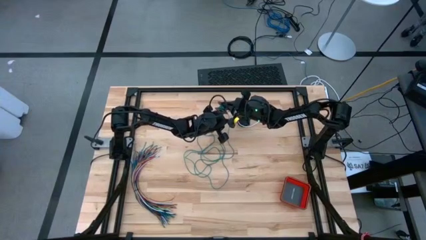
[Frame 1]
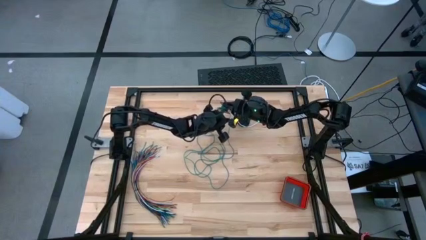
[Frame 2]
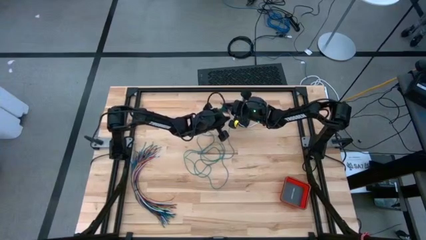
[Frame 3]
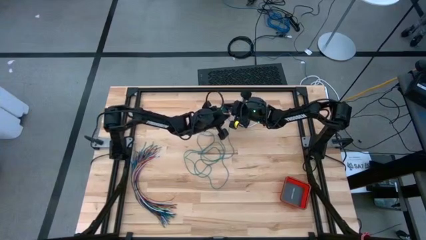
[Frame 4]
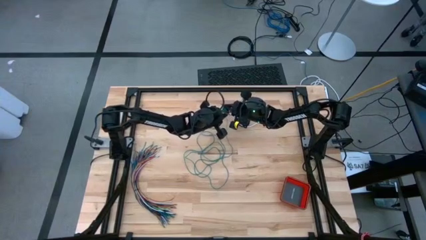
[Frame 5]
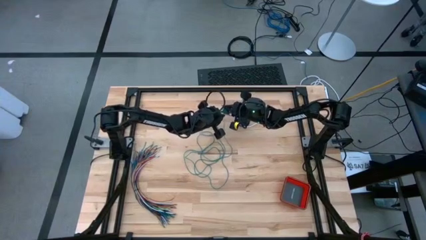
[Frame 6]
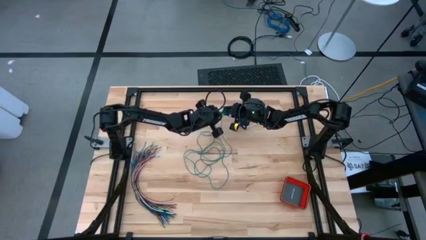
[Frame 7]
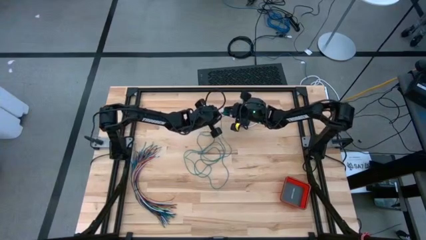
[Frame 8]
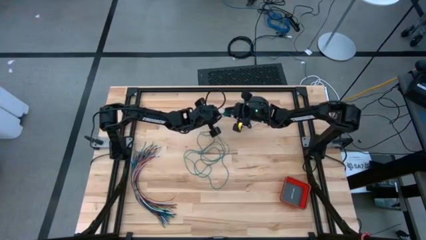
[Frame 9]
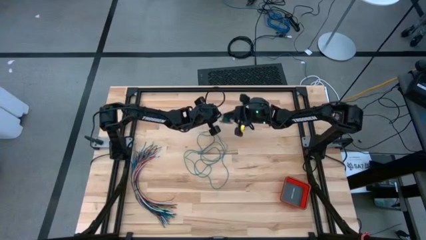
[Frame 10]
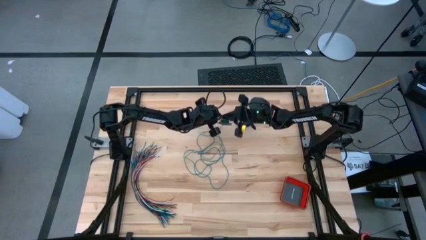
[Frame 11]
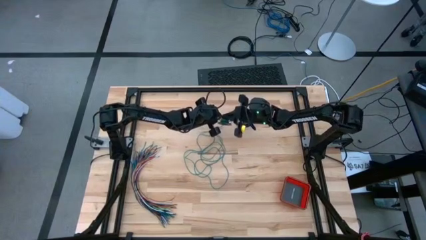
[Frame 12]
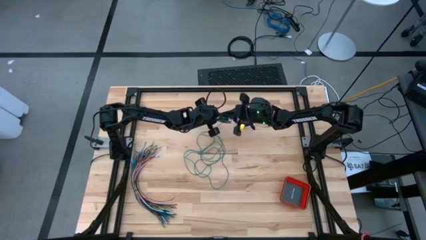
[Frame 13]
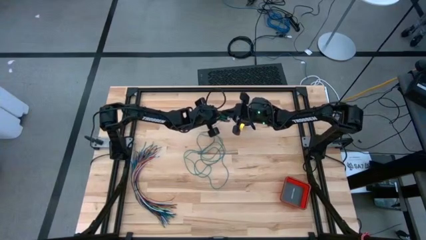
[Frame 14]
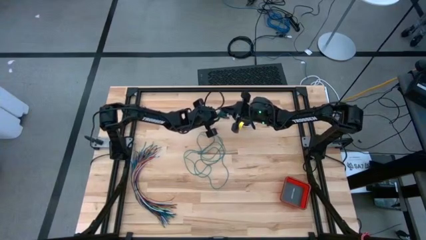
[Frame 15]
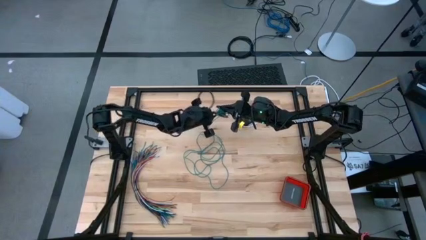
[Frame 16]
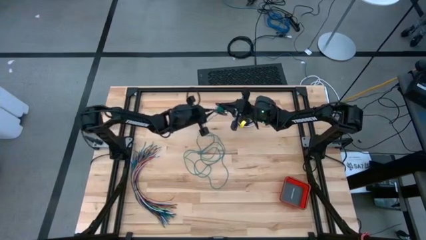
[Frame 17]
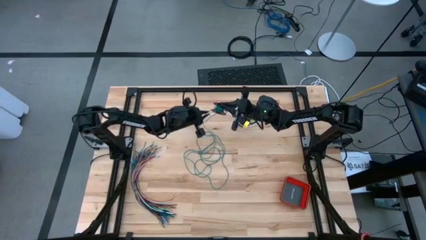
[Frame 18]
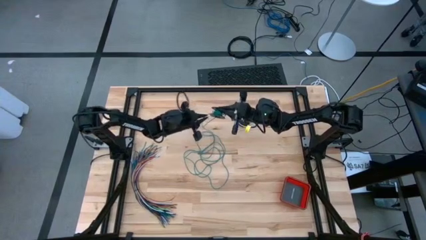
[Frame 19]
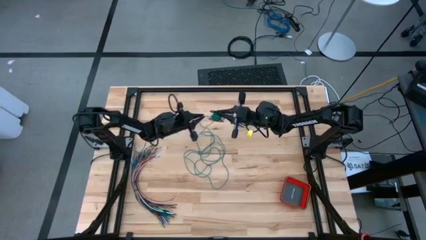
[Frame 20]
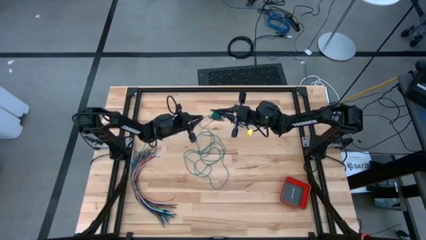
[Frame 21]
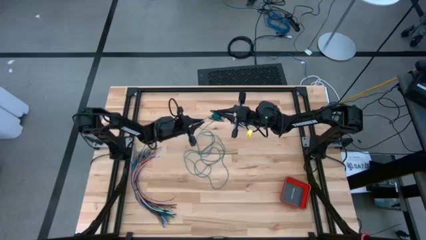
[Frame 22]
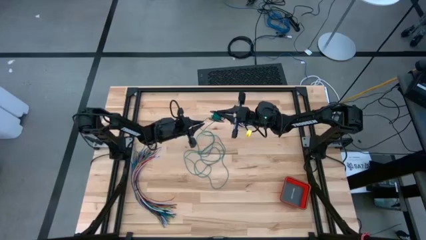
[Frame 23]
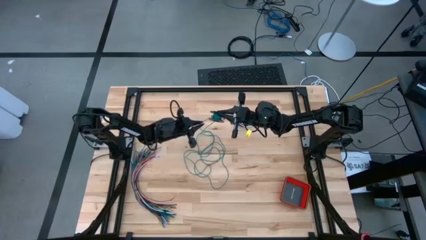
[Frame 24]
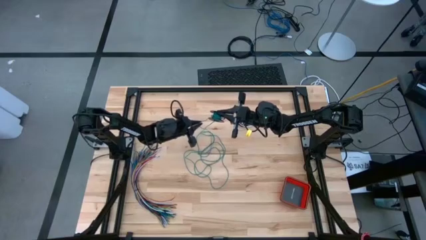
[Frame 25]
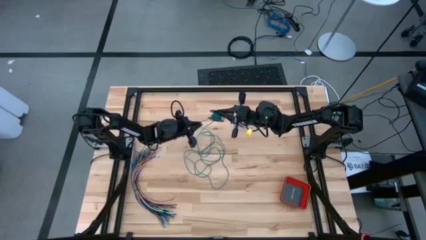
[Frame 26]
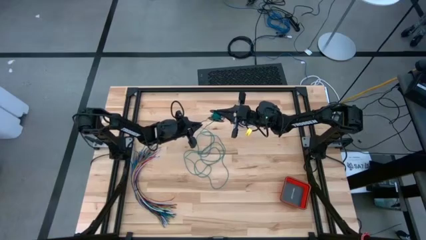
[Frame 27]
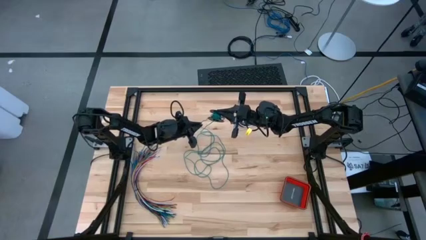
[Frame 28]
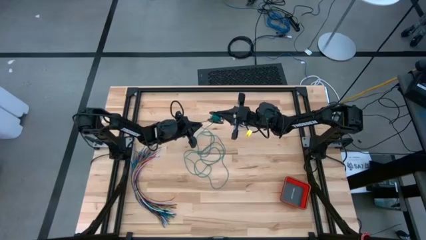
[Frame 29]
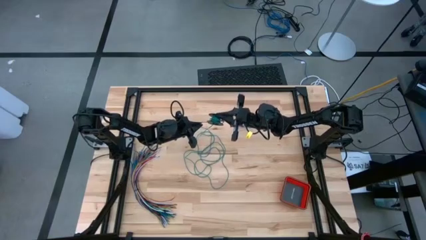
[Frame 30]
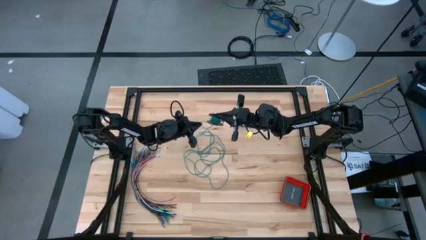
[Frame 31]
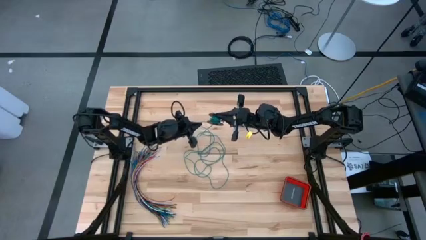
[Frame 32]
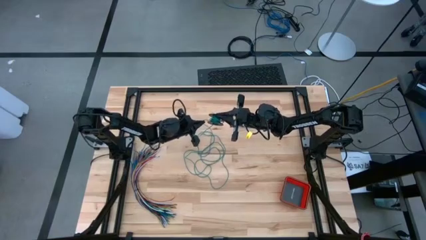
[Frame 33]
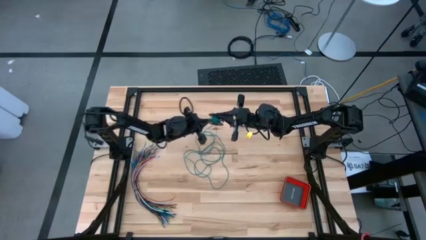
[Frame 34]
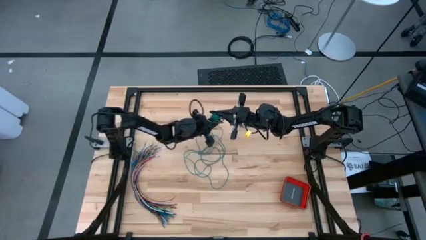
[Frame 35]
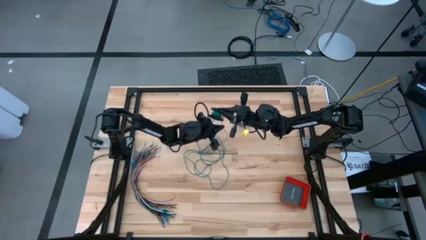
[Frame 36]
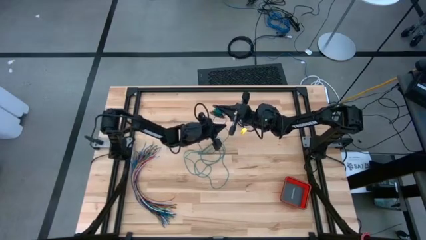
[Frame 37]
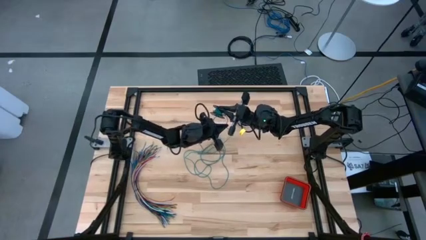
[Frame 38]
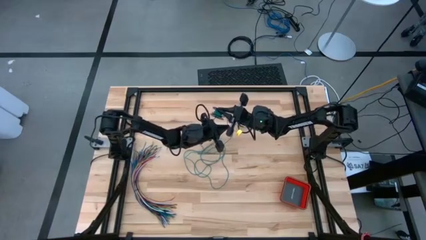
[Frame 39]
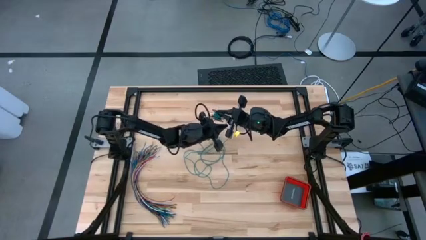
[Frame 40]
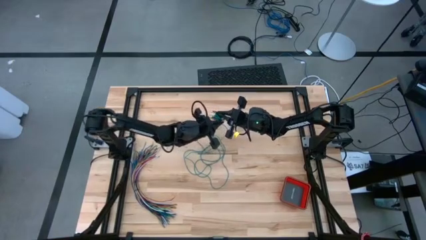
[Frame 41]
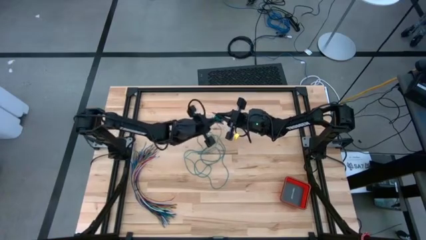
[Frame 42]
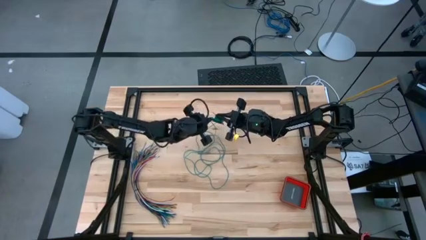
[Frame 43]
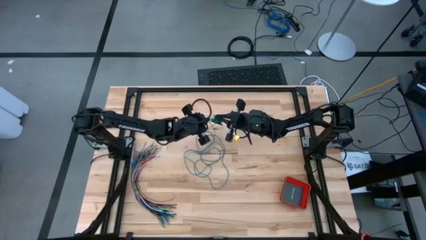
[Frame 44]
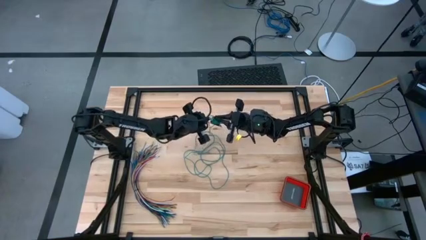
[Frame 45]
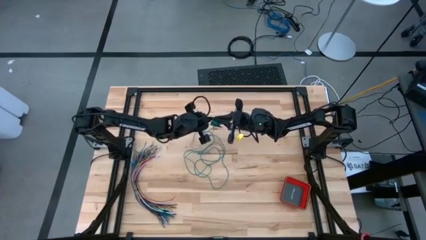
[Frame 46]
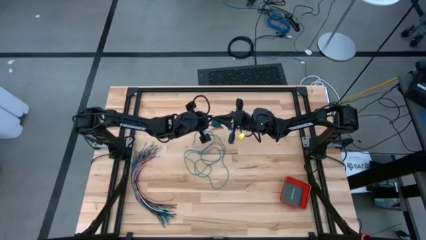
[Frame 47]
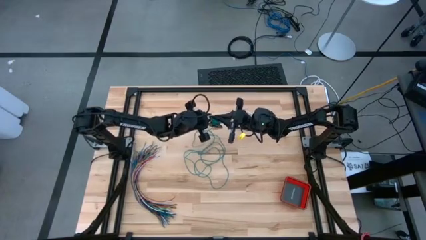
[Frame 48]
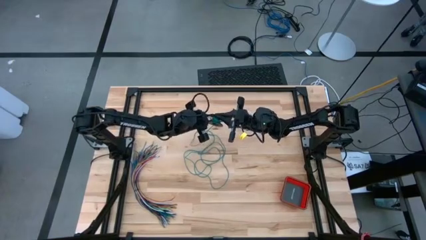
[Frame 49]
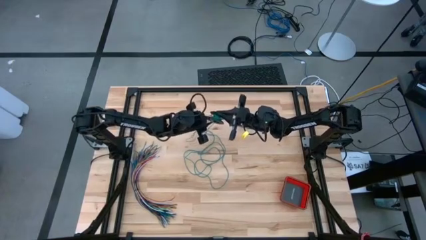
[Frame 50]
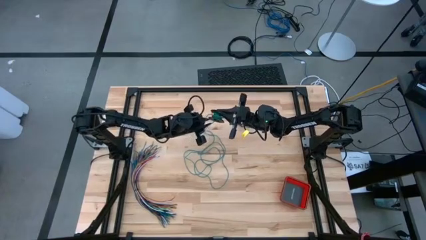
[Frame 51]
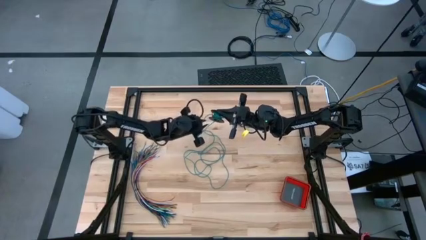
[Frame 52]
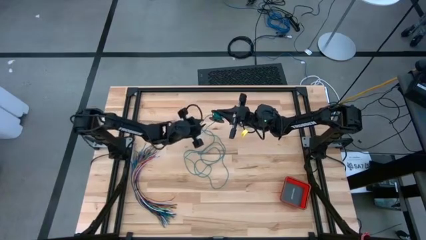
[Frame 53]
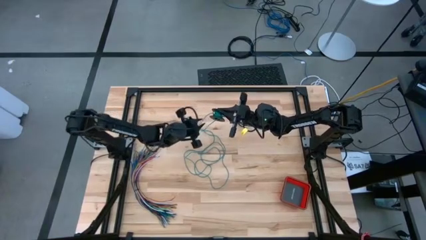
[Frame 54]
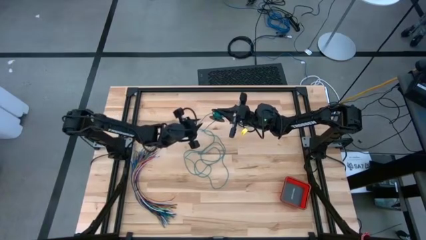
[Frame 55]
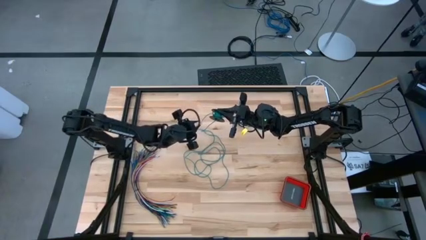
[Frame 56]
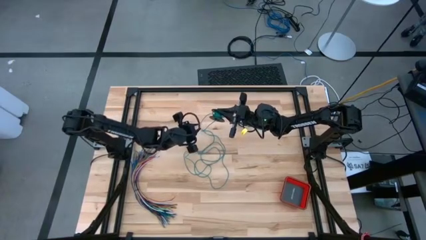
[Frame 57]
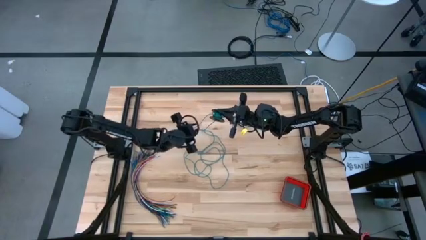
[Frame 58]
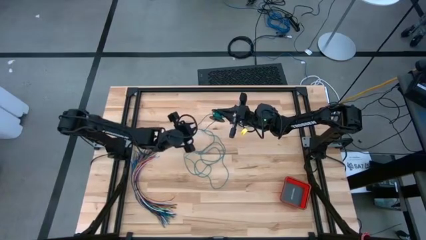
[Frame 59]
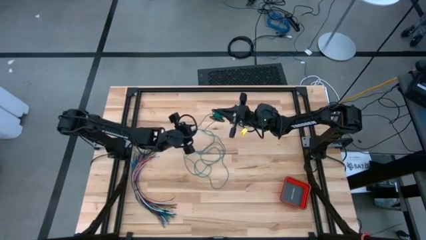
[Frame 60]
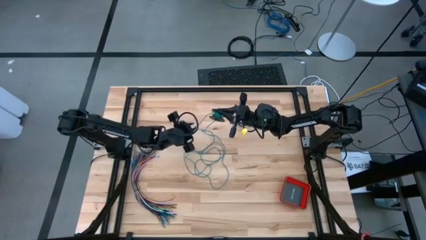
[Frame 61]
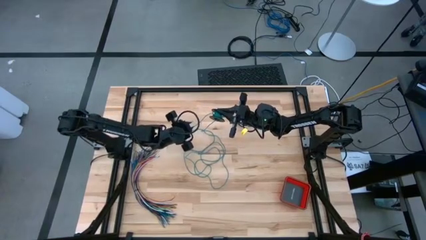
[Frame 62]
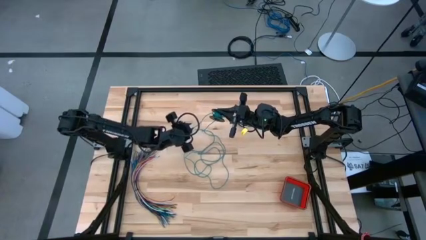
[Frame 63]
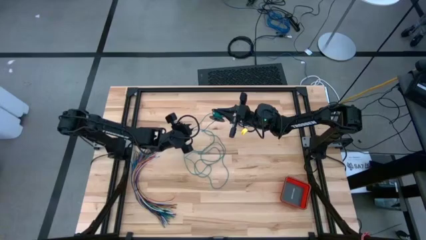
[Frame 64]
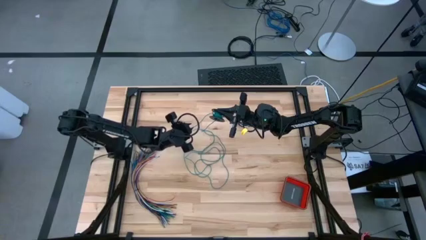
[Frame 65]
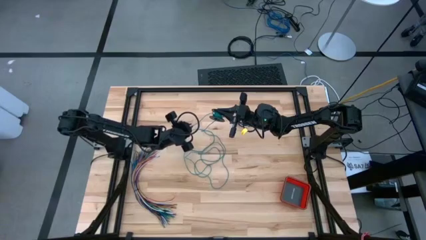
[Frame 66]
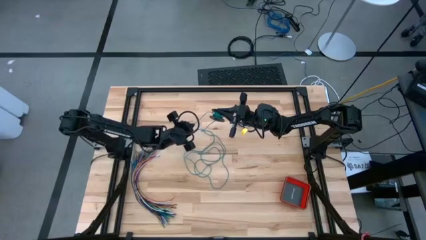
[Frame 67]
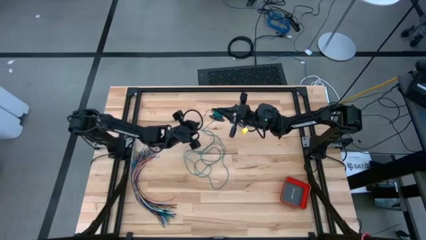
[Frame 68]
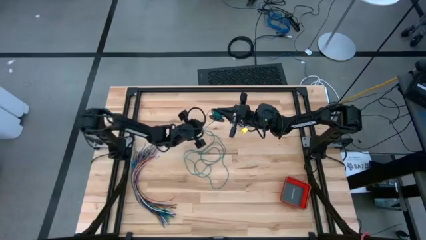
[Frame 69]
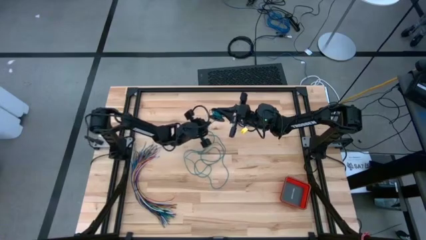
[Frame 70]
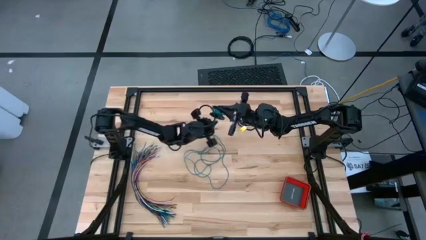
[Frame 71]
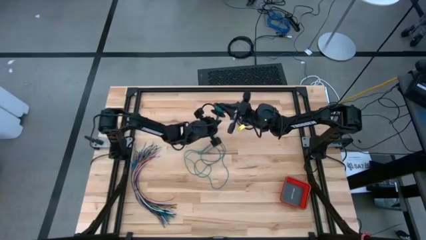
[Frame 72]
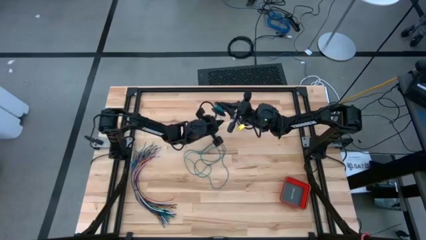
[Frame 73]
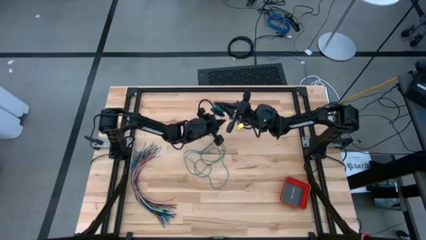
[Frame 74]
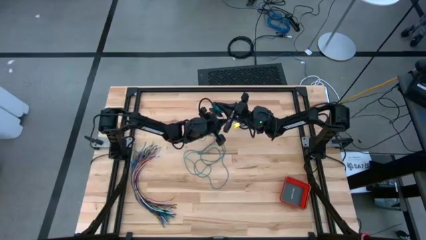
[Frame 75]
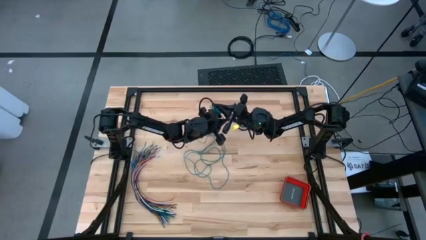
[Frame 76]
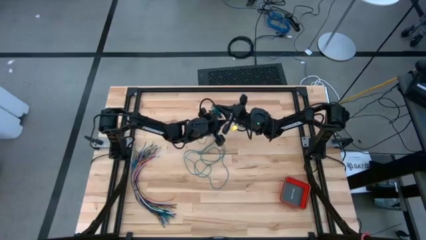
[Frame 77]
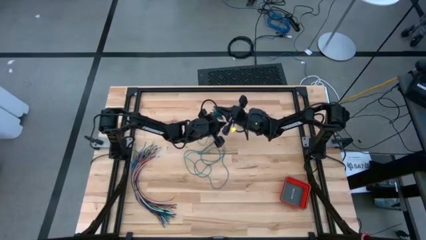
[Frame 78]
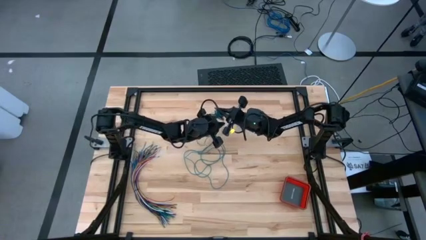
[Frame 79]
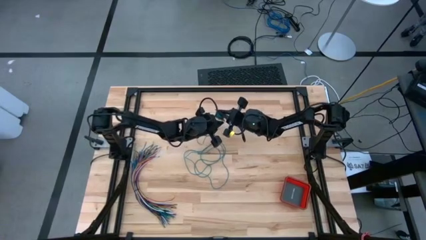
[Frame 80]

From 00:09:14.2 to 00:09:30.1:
Task: Coil cords
Coil the green wire onto the spool
